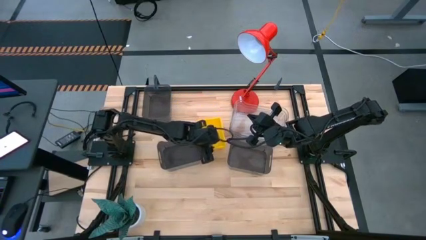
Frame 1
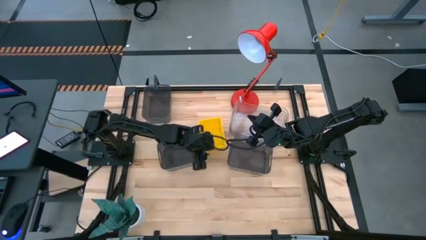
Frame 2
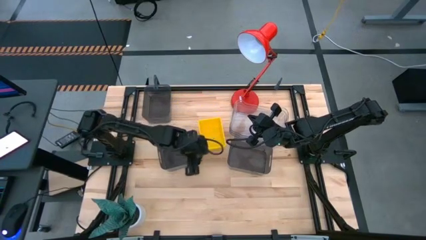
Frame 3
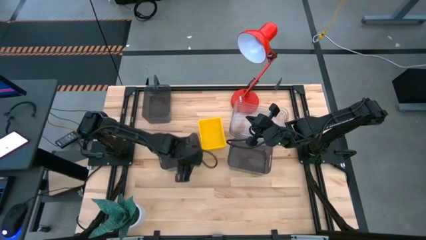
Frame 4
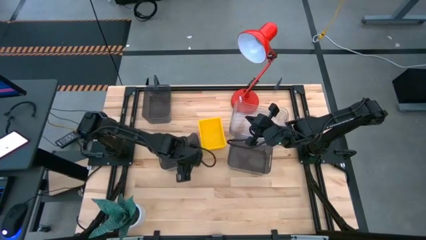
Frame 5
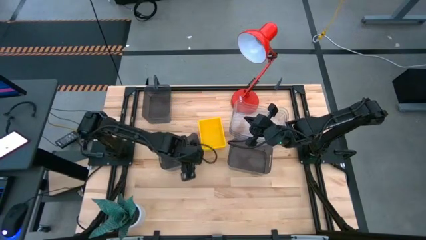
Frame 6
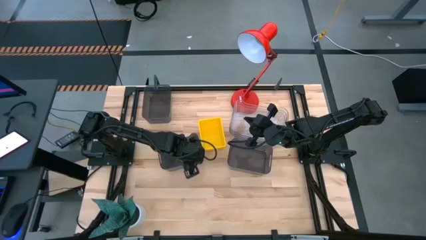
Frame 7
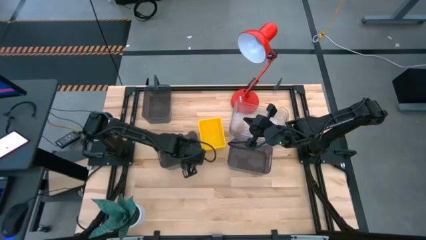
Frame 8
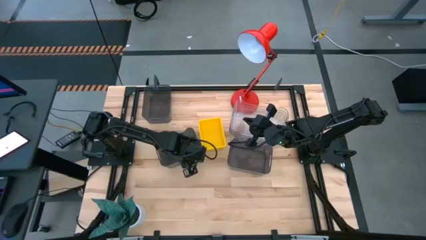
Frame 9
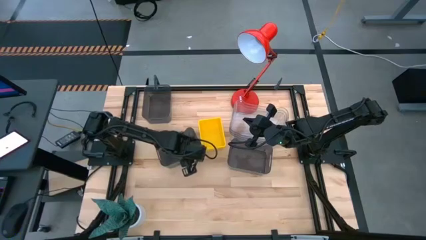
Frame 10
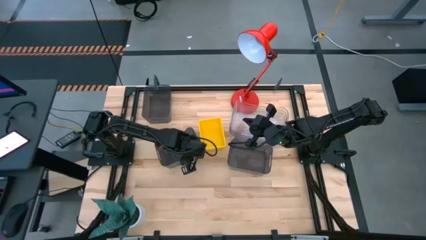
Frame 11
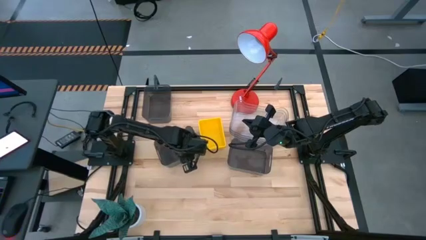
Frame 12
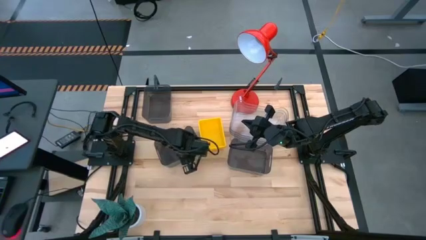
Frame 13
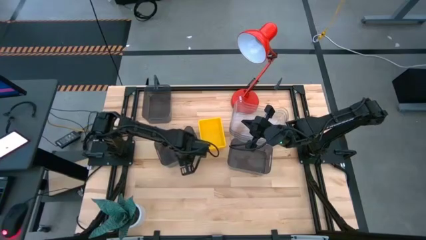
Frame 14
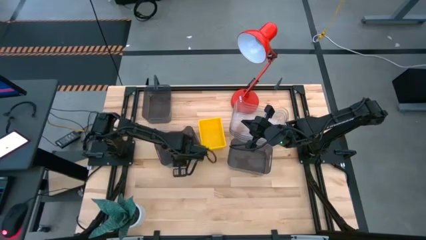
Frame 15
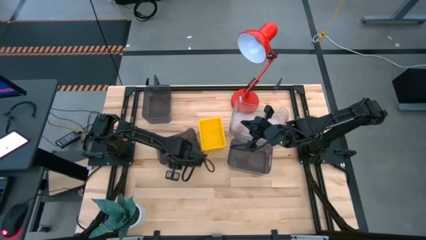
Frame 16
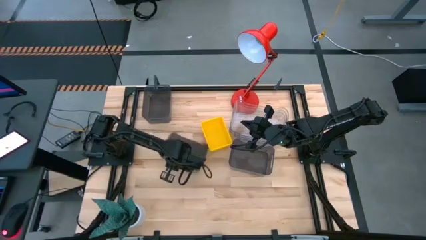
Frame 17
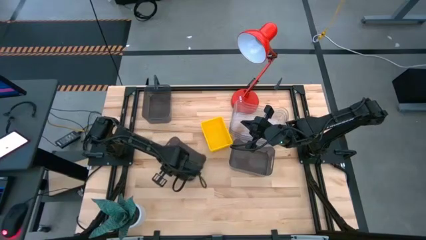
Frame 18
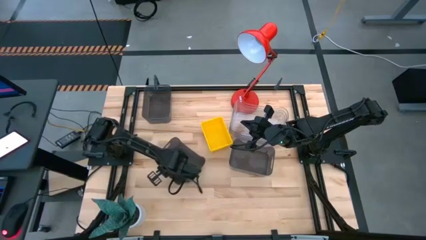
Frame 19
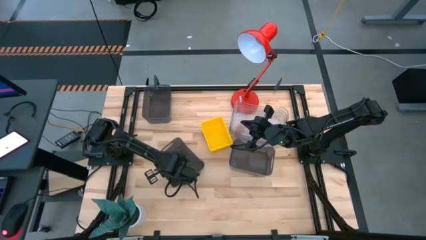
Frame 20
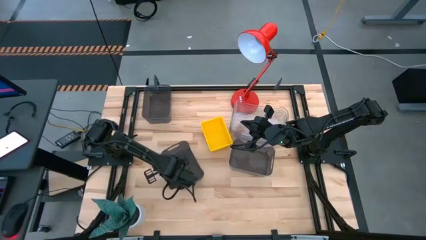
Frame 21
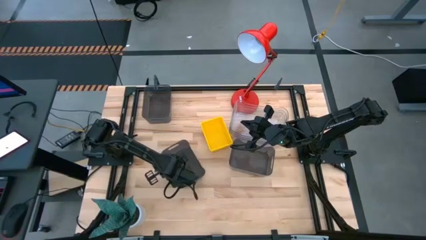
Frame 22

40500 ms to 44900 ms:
Stack the bottom left black bin on top of the top black bin

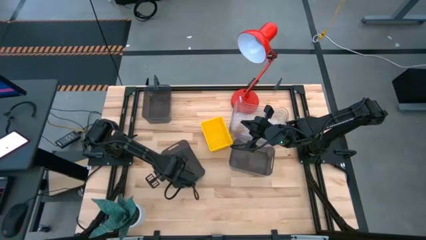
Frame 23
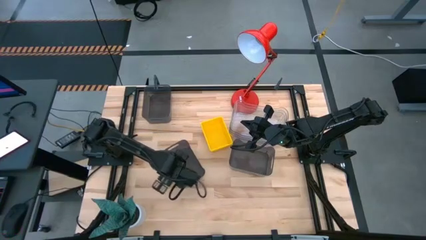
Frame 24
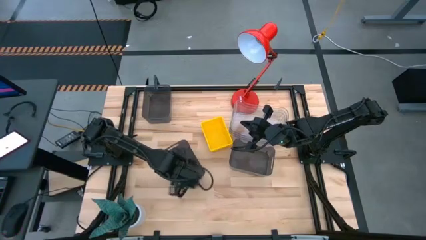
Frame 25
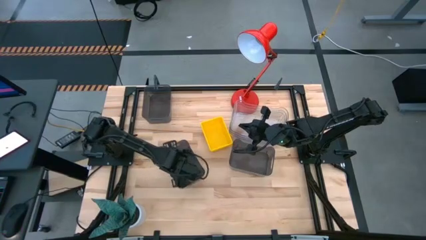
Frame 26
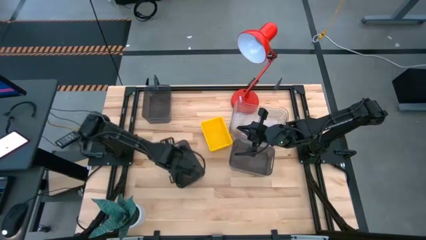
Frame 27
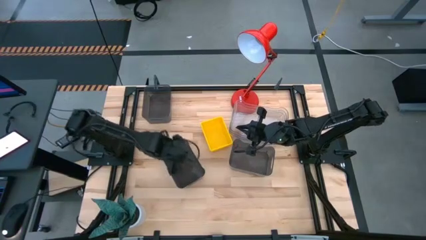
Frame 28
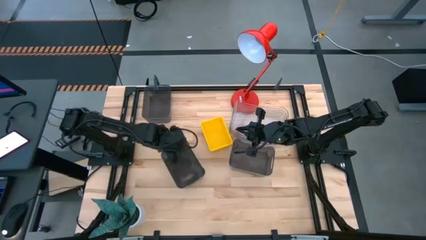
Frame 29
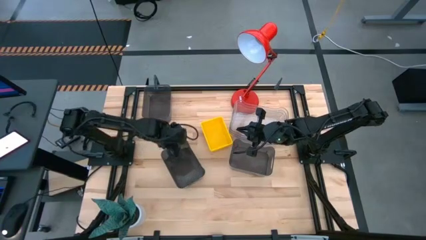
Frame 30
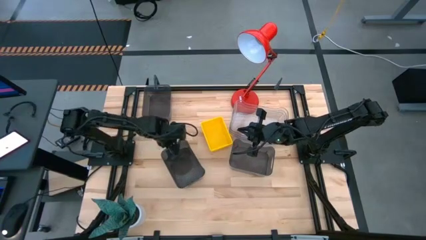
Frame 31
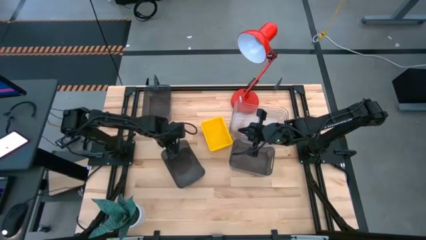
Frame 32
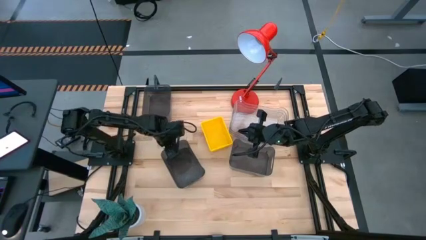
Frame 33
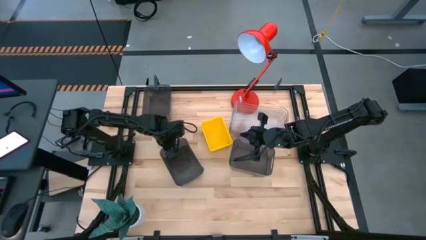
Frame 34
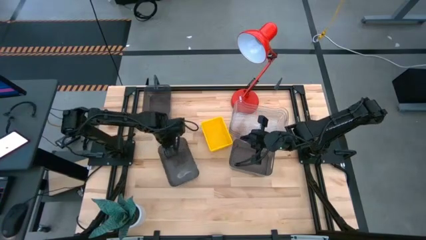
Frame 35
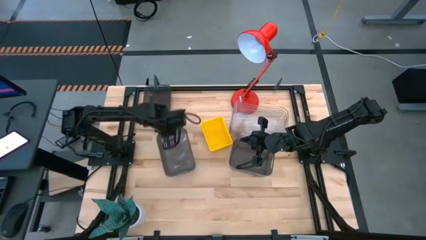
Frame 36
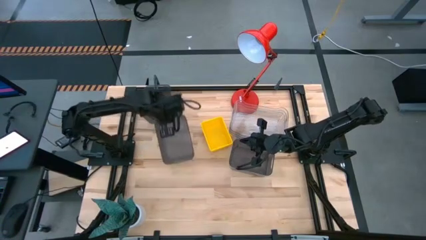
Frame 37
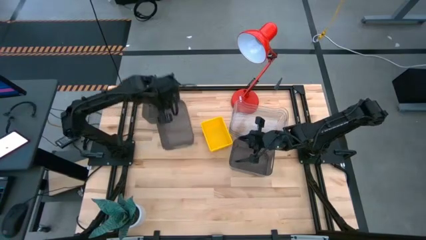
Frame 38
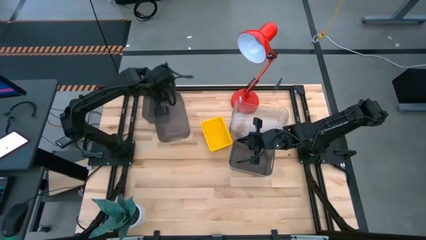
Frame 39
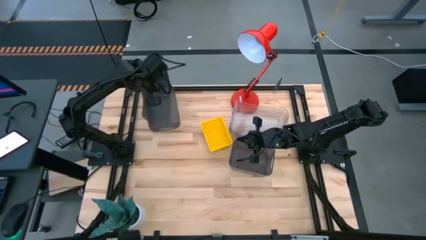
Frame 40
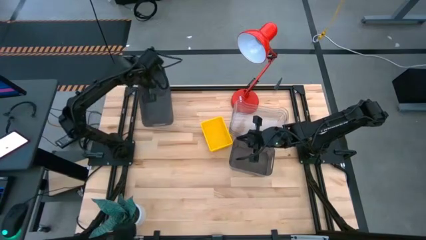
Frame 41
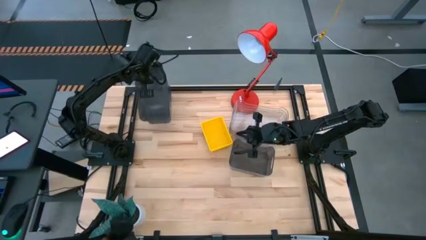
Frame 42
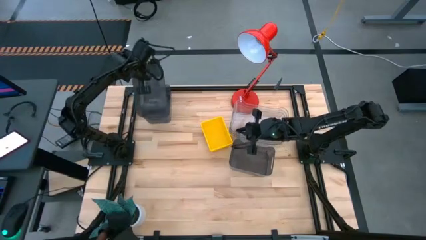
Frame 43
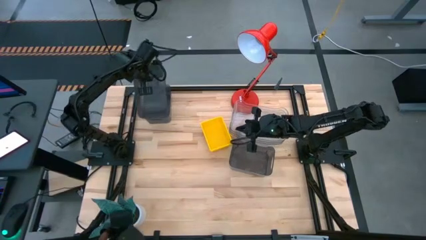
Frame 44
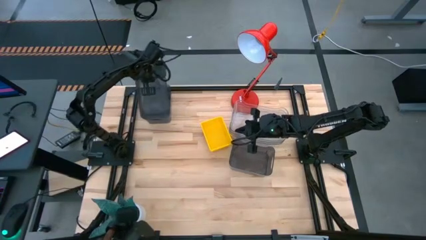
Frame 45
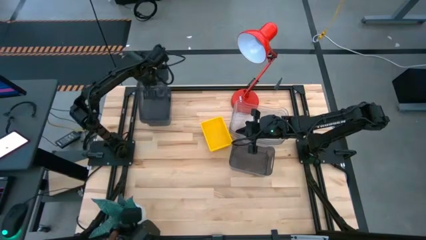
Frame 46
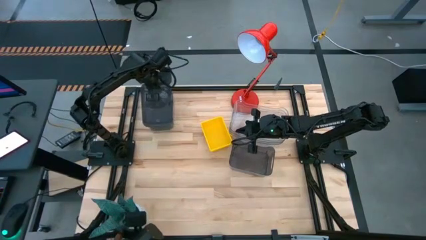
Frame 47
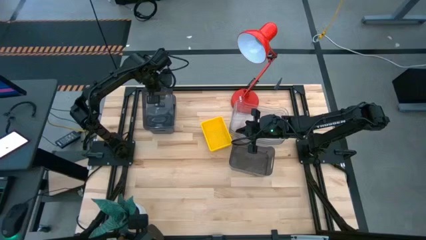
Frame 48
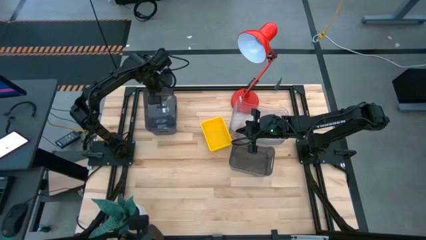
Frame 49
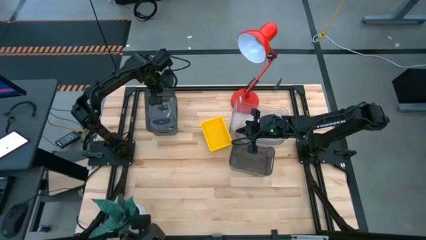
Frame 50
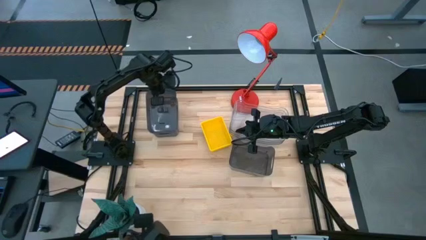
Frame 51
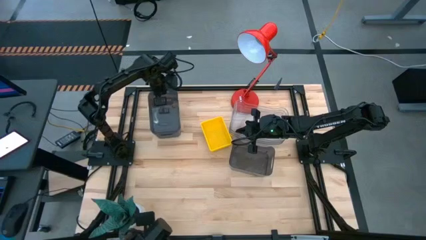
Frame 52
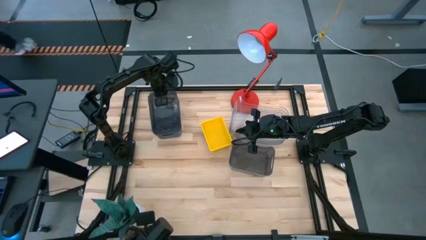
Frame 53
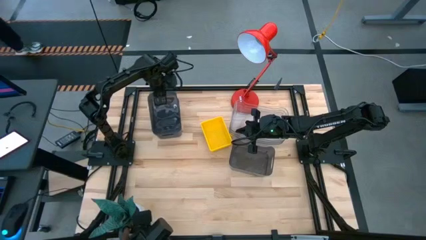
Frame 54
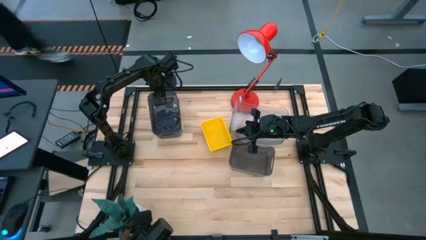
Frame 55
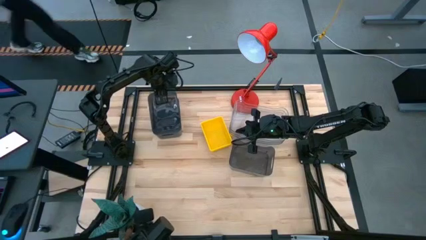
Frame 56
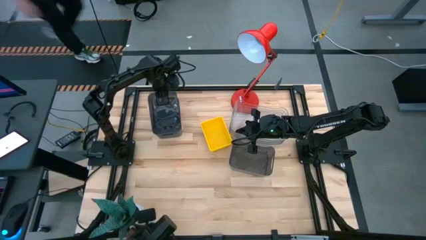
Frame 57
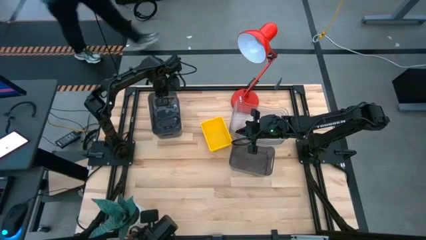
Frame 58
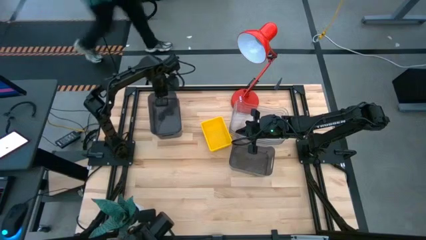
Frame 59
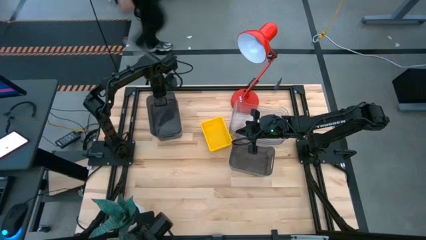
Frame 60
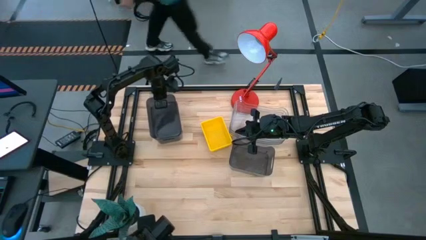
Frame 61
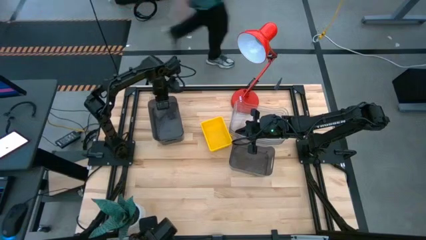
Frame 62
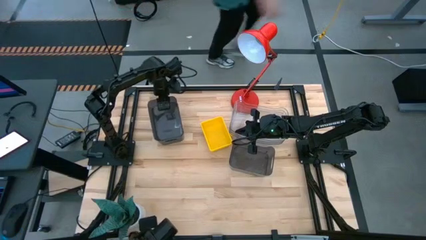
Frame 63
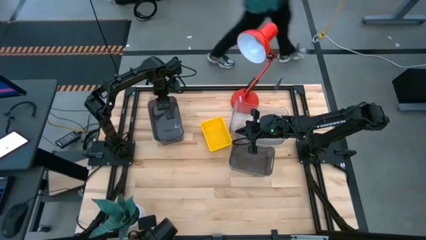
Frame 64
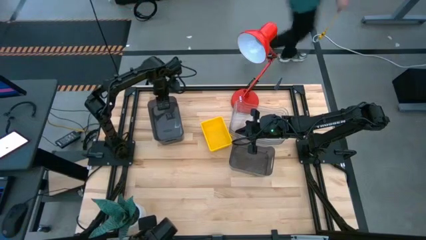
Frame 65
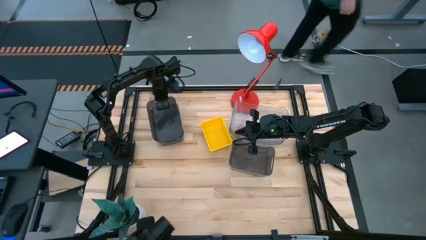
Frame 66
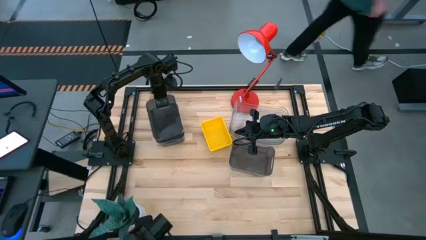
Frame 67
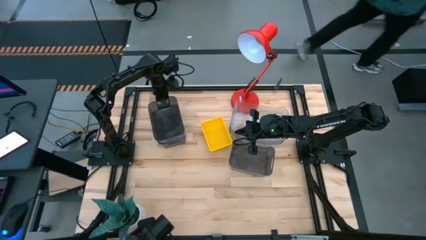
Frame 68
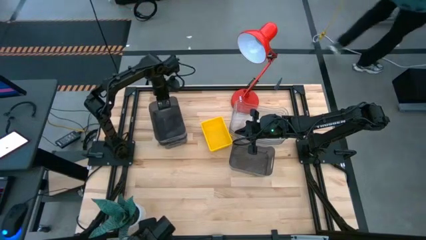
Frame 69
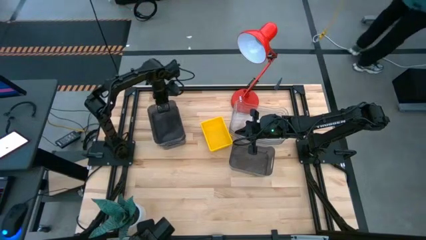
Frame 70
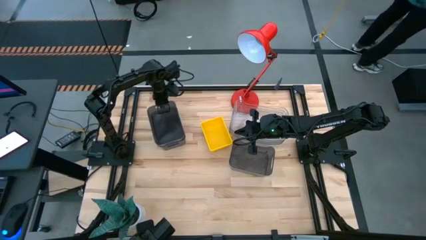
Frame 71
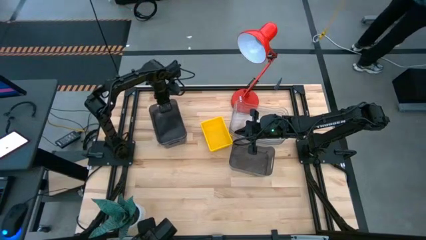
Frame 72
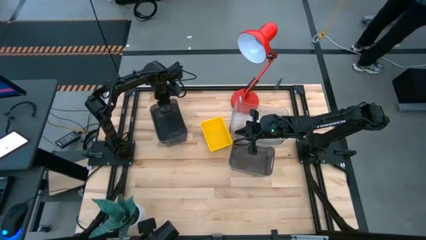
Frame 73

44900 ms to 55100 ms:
Stack the bottom left black bin on top of the top black bin
